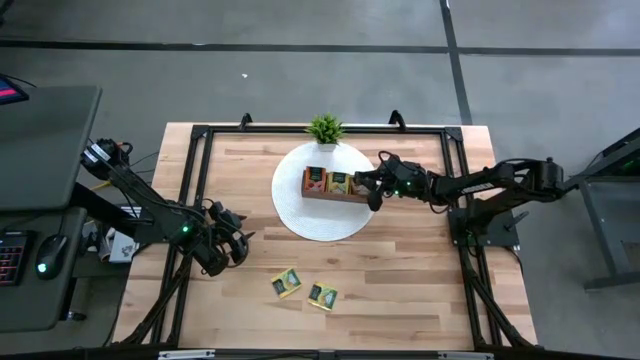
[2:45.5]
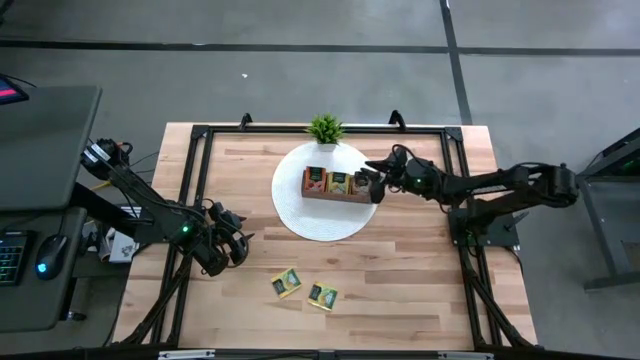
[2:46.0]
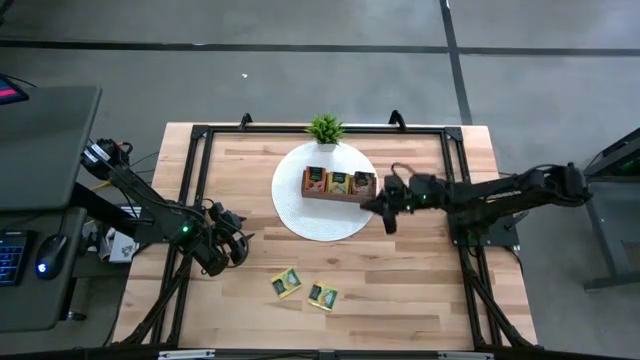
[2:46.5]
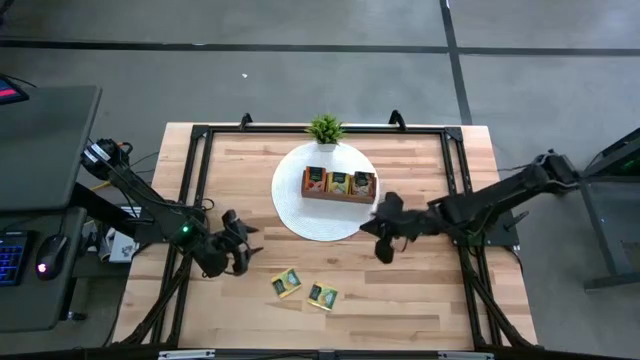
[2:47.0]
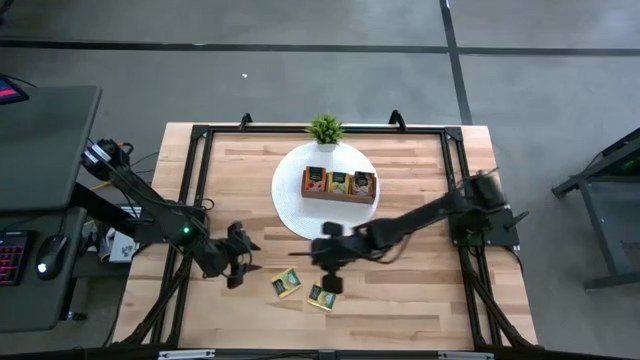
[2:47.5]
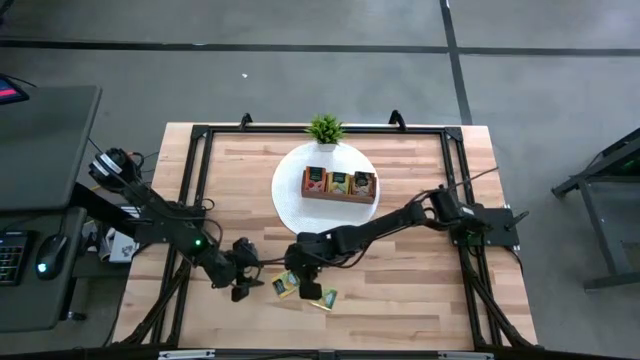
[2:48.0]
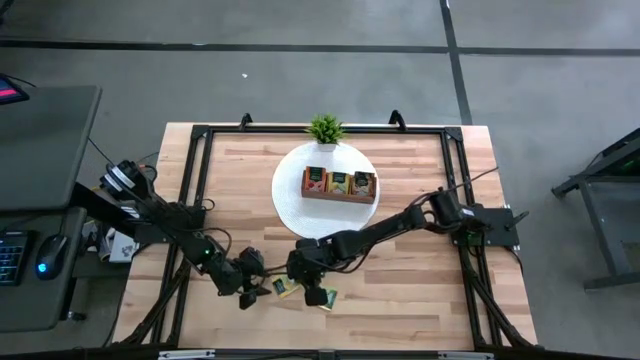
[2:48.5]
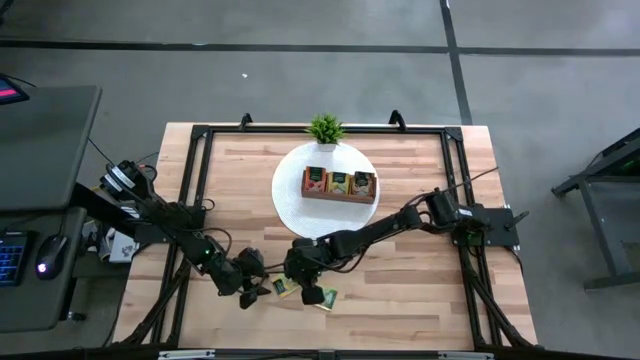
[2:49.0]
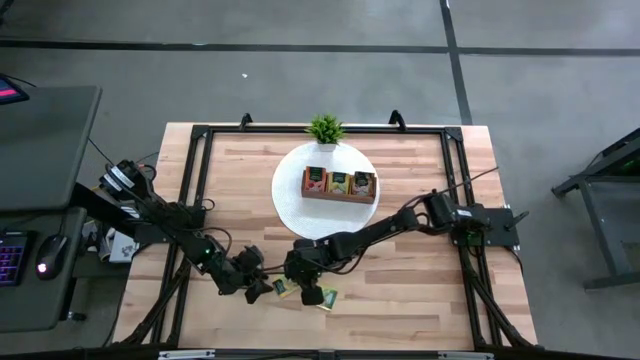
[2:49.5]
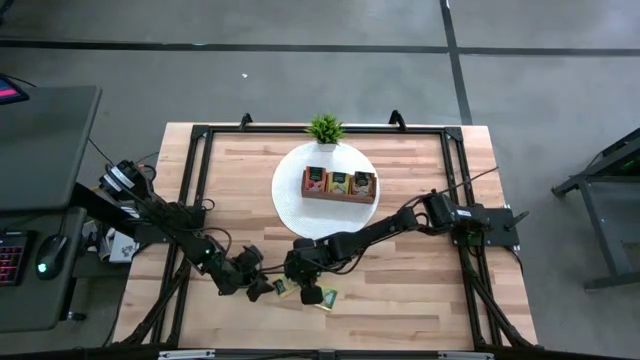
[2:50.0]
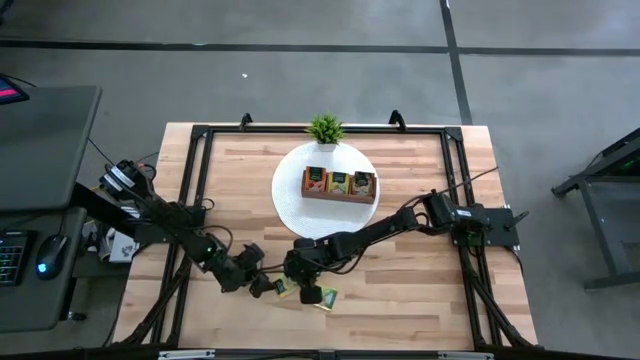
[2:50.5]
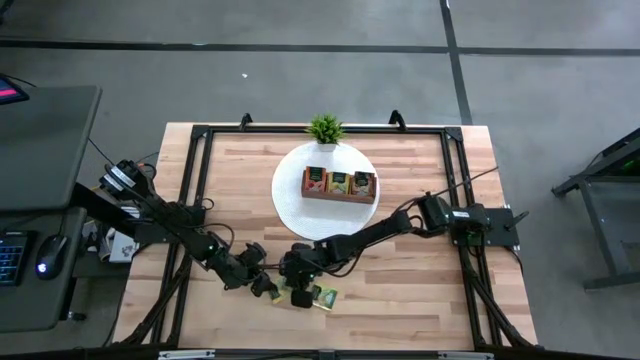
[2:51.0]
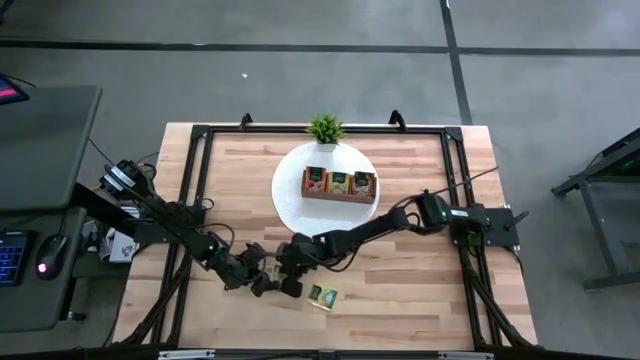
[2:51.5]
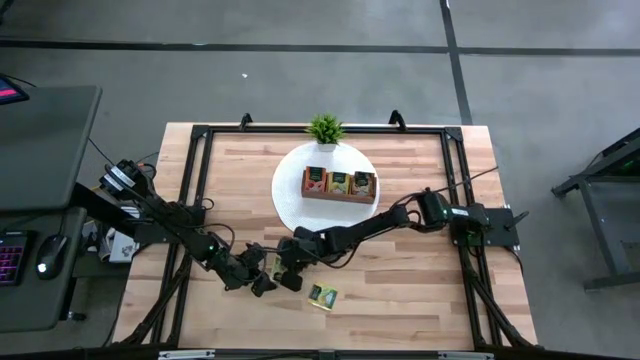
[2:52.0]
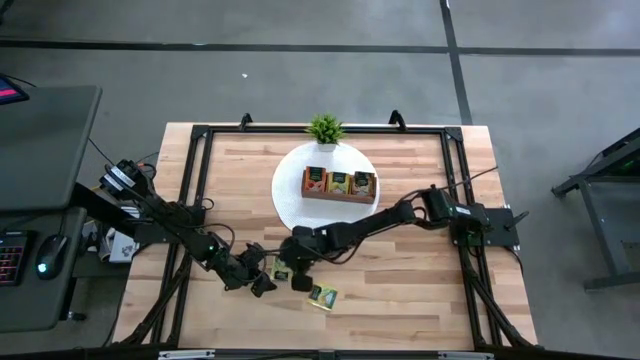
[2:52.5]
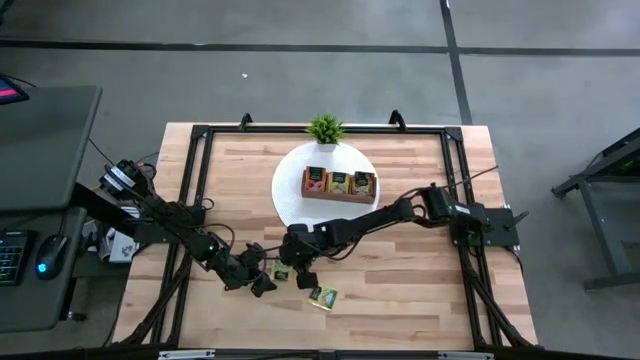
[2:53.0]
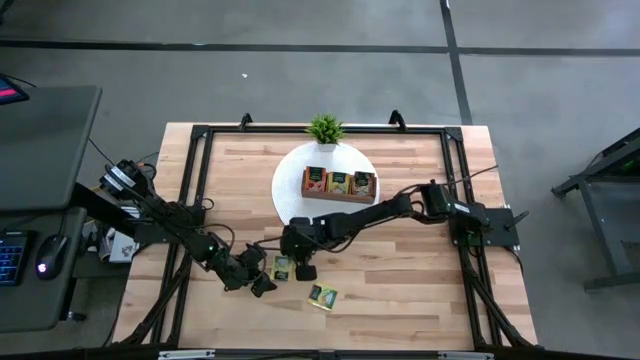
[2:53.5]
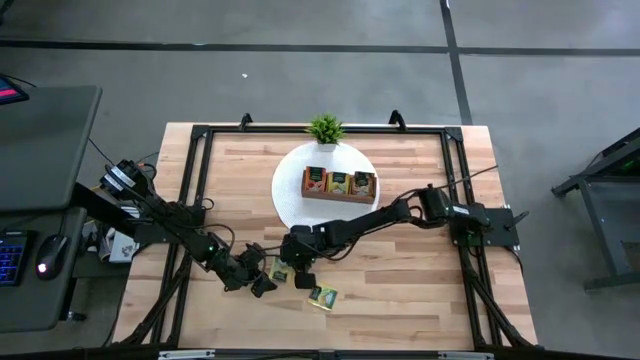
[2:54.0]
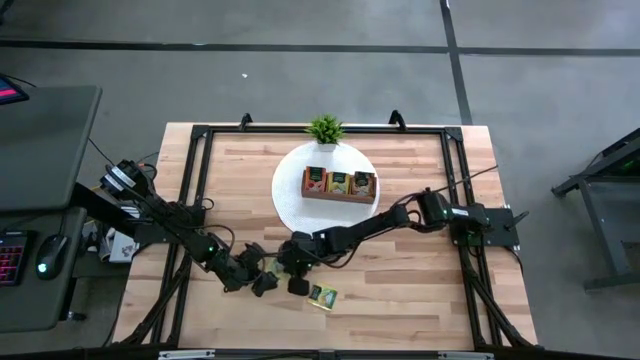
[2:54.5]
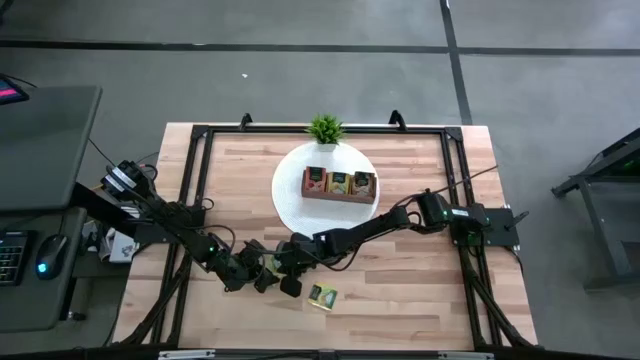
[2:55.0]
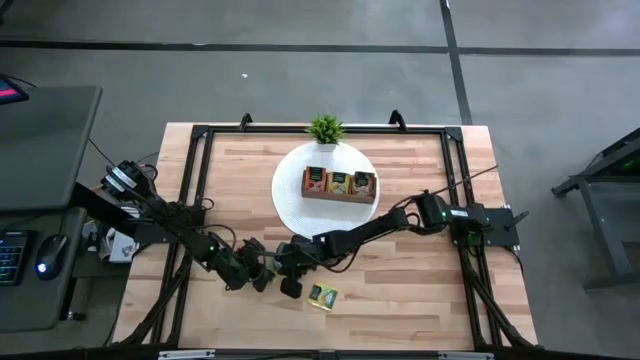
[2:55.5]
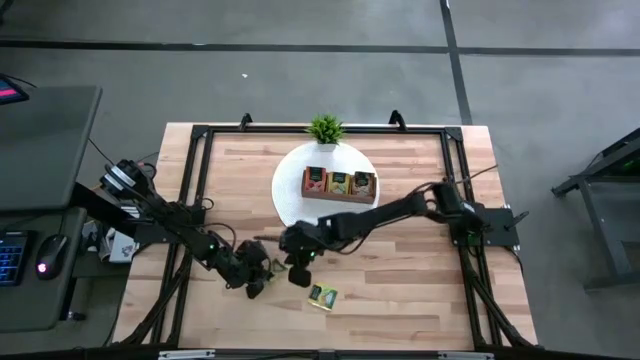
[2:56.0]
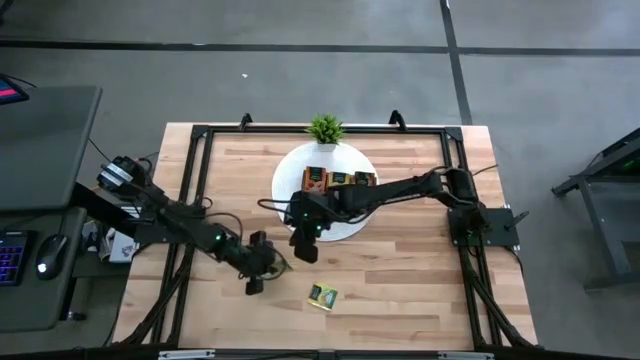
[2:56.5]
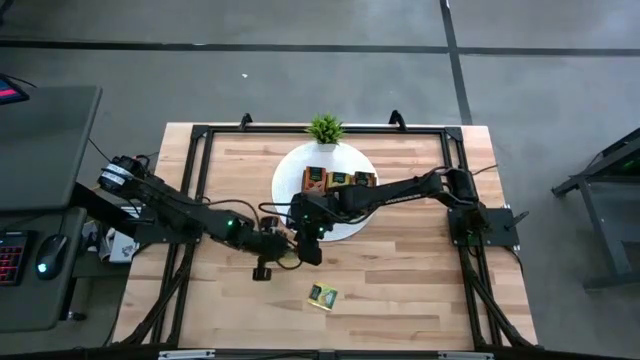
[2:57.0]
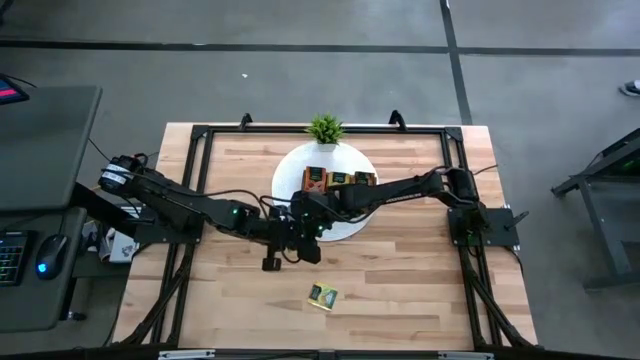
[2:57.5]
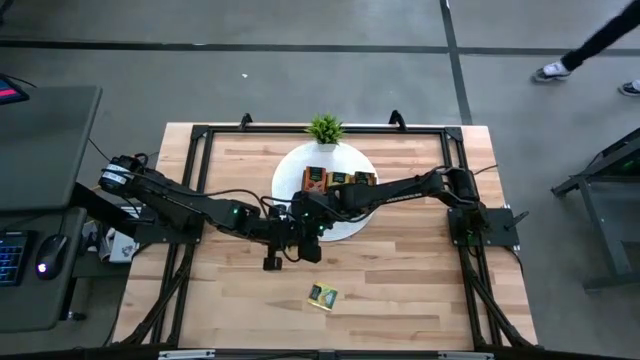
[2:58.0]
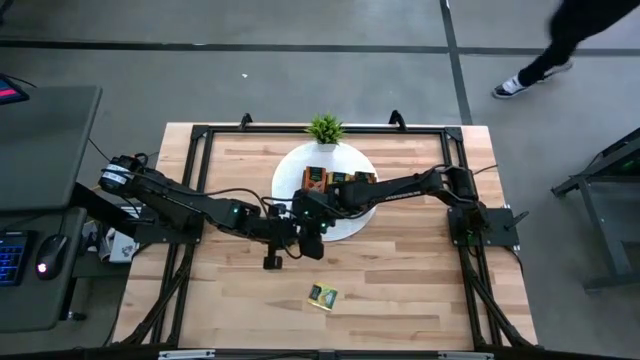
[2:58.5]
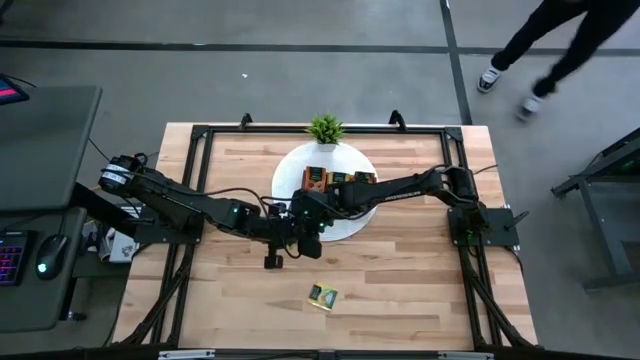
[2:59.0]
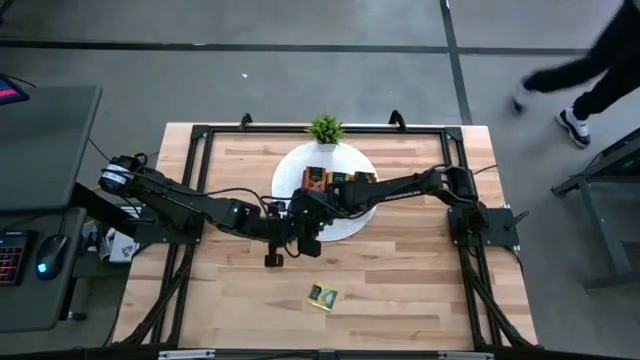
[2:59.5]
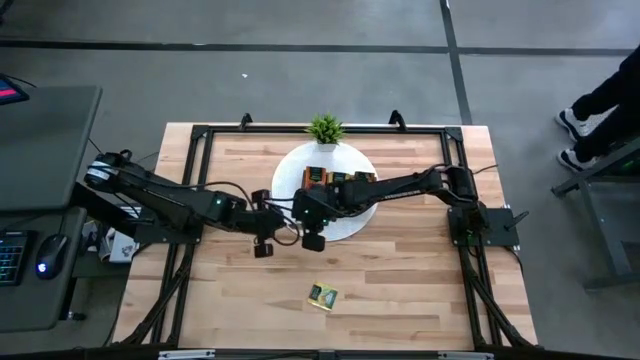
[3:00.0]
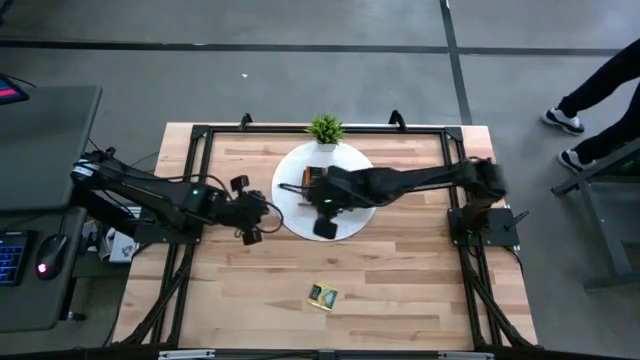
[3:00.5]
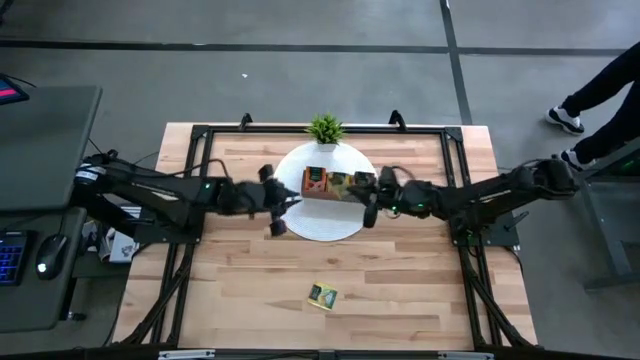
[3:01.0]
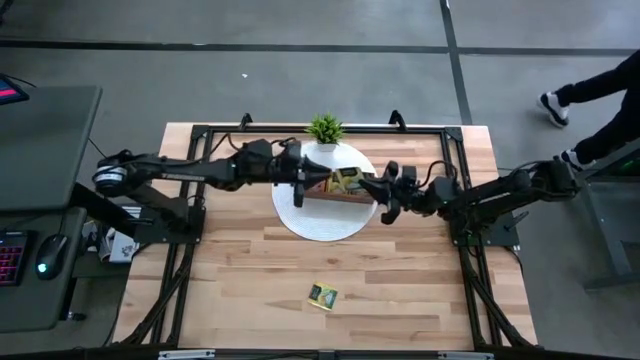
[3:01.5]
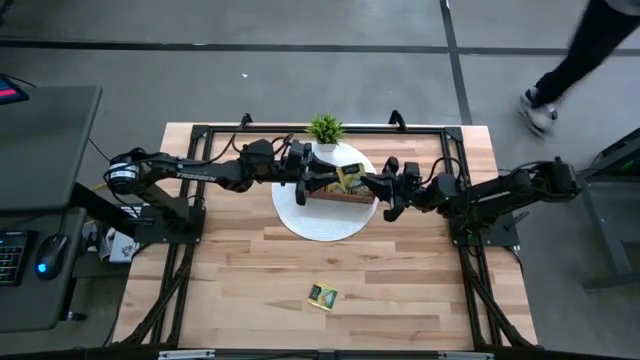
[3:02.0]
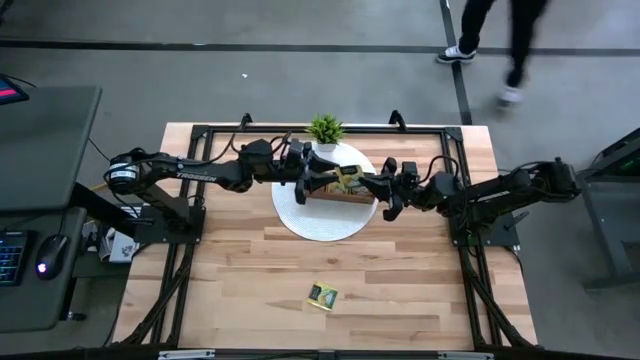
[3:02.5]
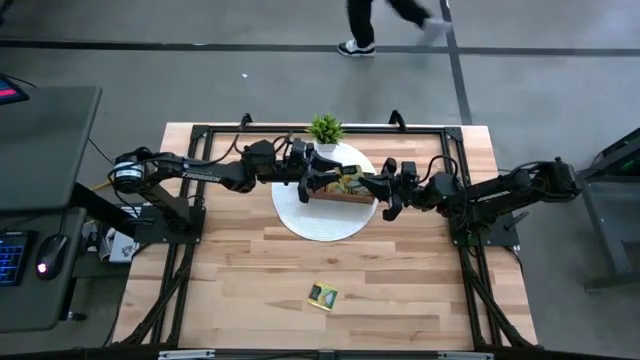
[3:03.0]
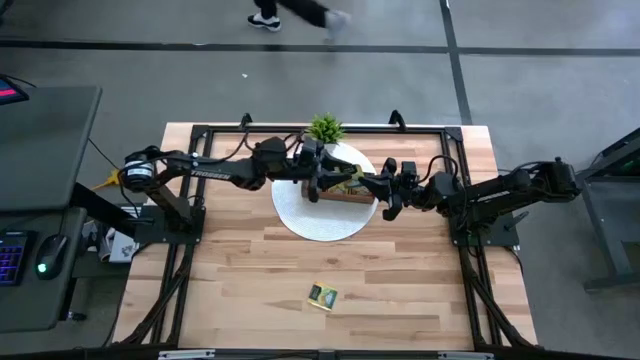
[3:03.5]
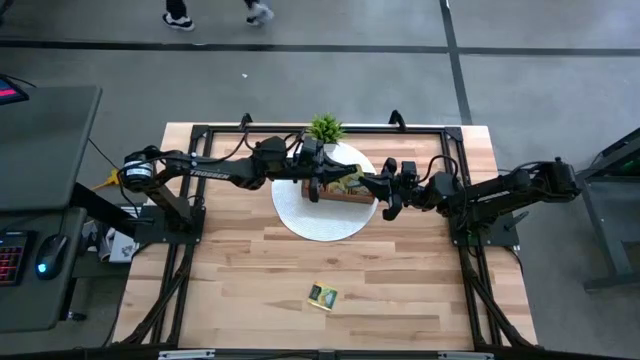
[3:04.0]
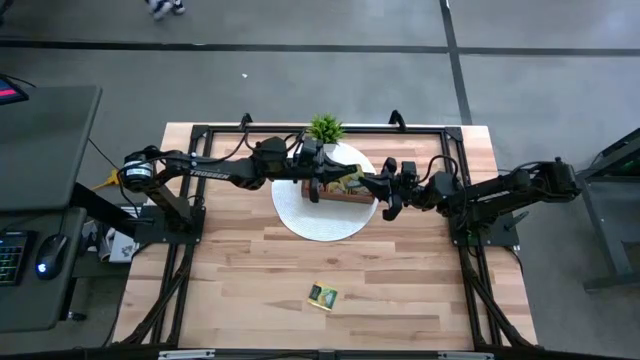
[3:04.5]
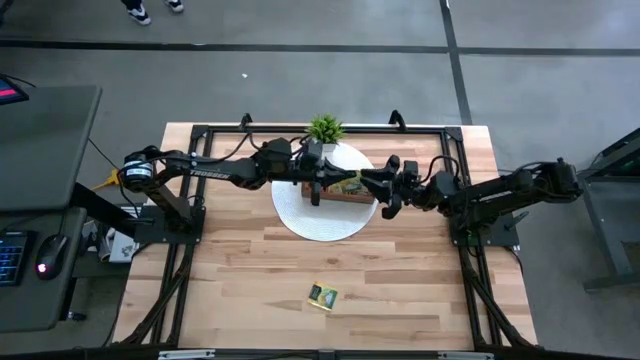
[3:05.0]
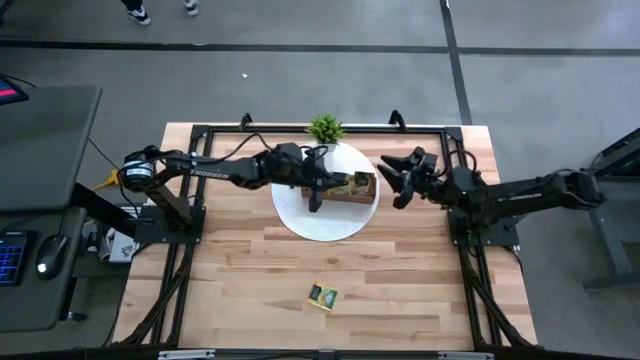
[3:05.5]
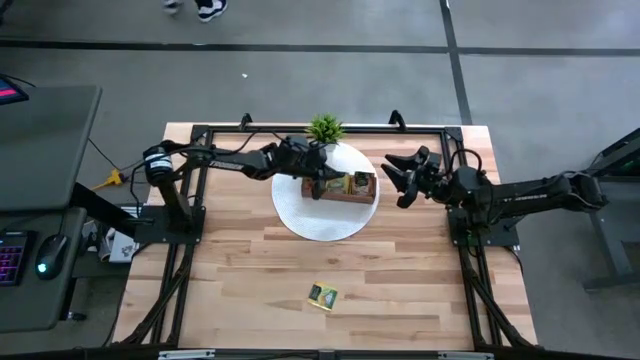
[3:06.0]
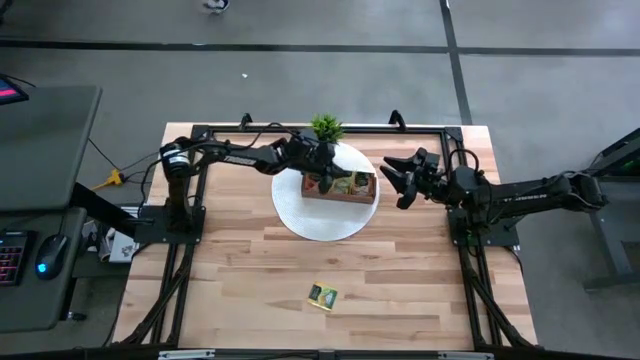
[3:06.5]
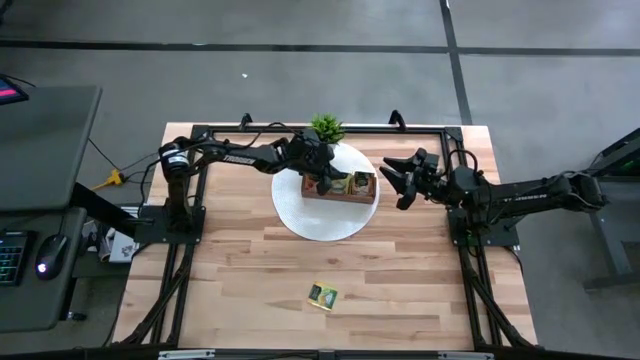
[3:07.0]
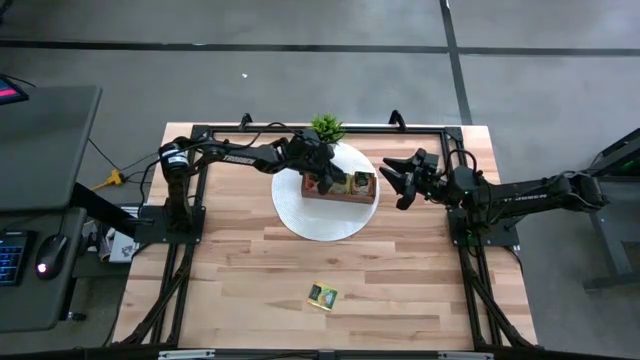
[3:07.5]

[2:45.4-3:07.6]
Task: Pick & Place Tea
Put the yellow tea bag into the middle section of the wooden organizer
